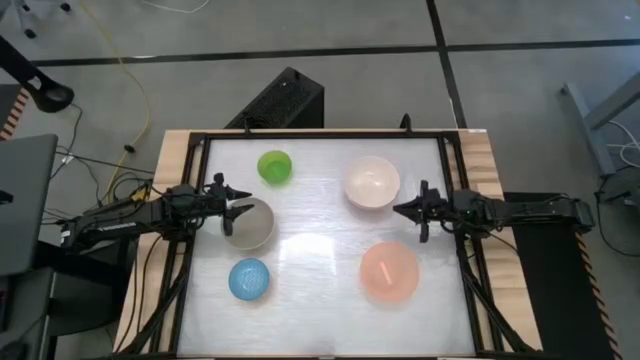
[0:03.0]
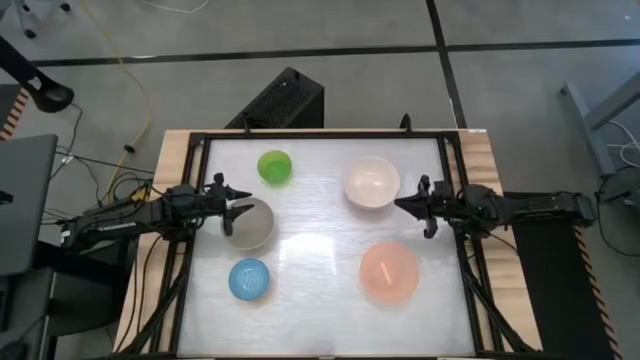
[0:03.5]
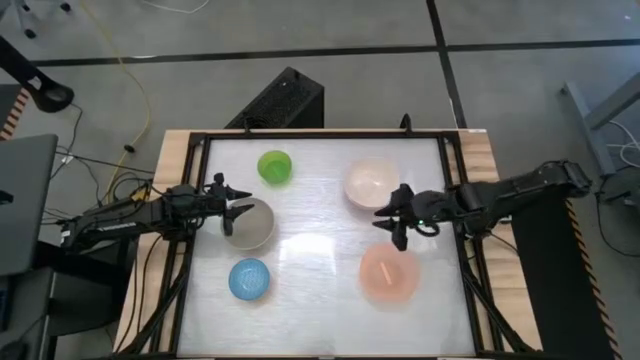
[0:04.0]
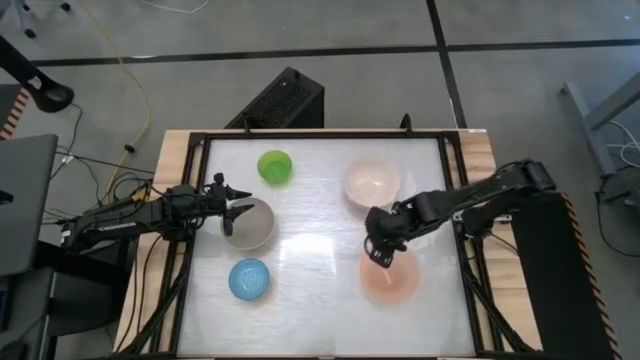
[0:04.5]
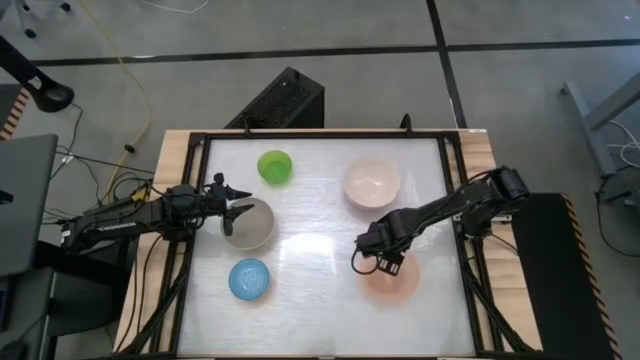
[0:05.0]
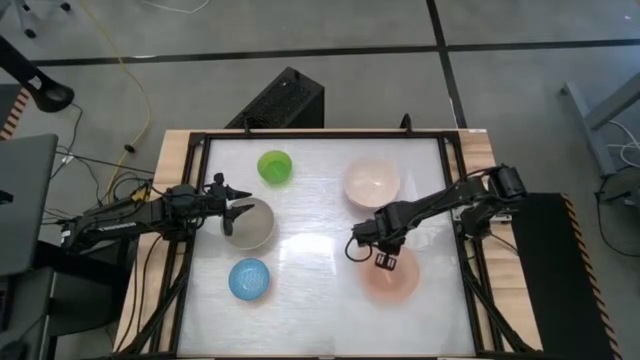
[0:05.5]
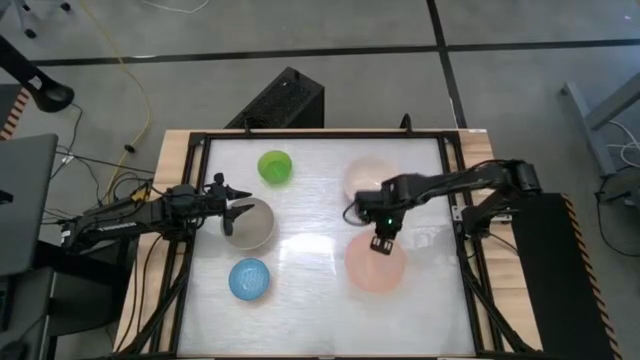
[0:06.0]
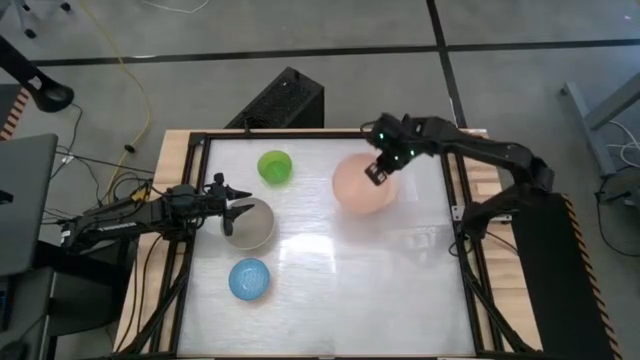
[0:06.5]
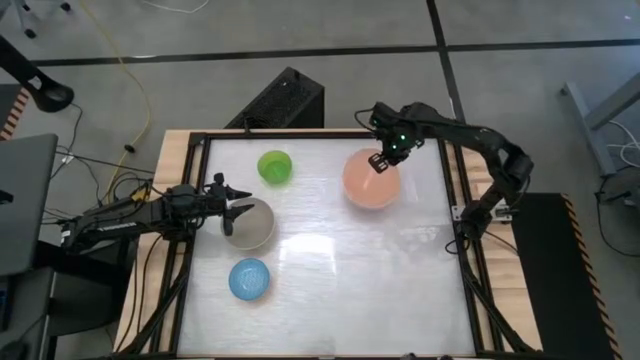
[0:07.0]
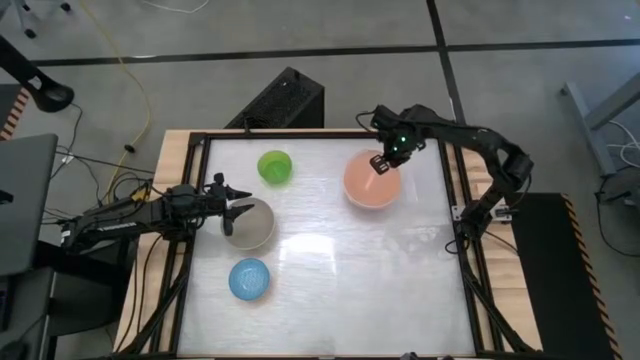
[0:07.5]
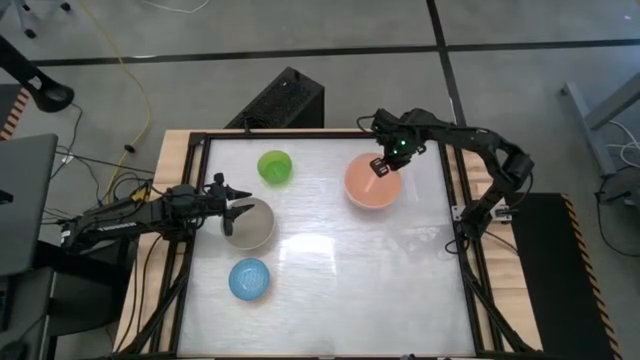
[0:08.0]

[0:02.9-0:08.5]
Stack the orange bowl on top of the white bowl

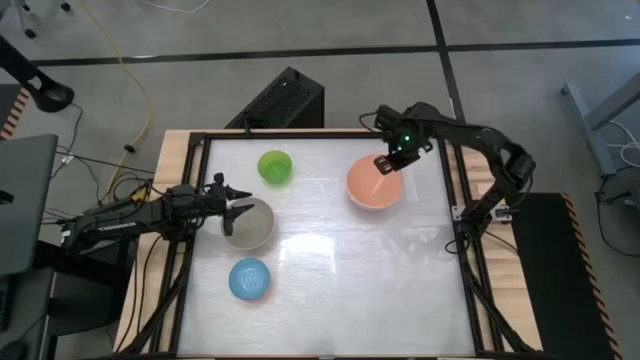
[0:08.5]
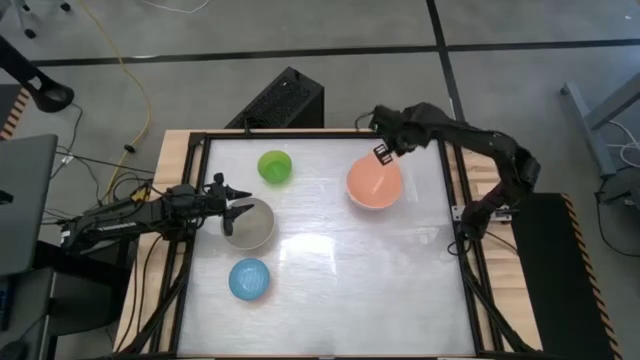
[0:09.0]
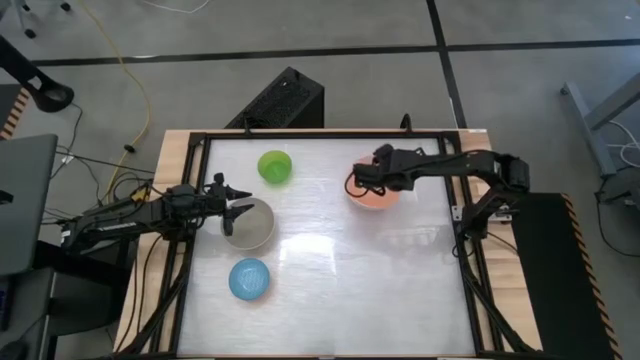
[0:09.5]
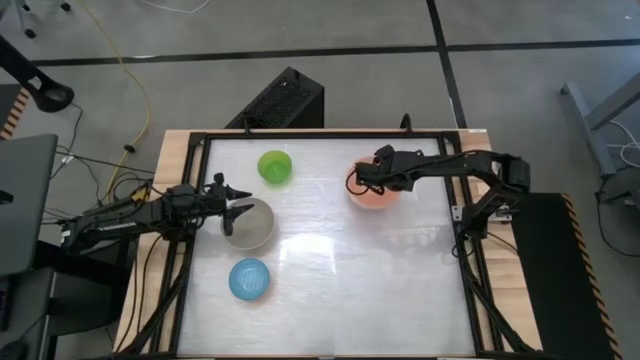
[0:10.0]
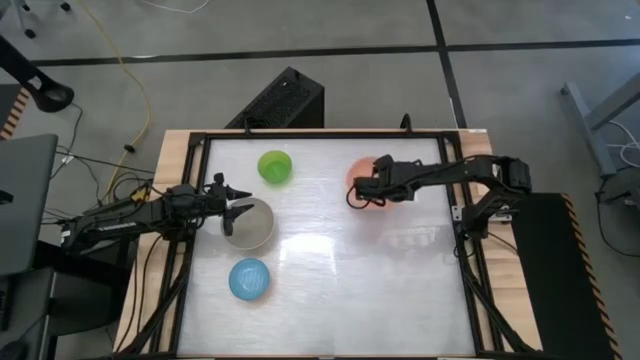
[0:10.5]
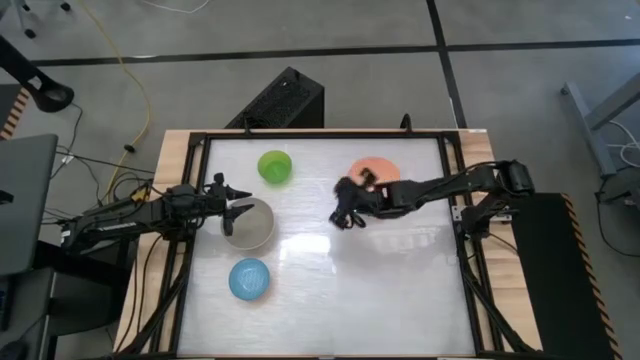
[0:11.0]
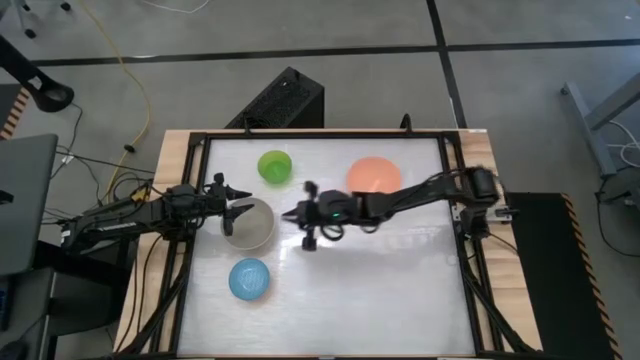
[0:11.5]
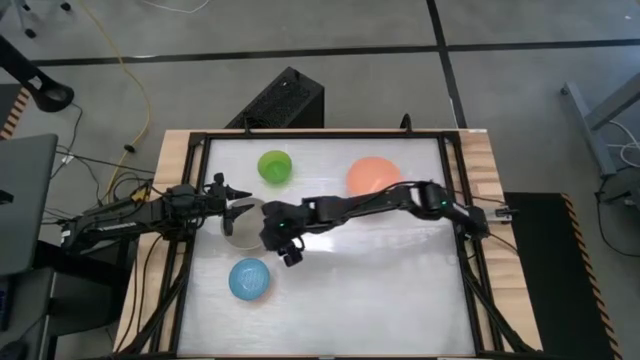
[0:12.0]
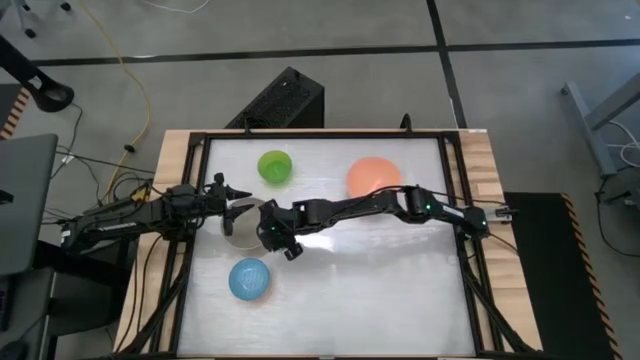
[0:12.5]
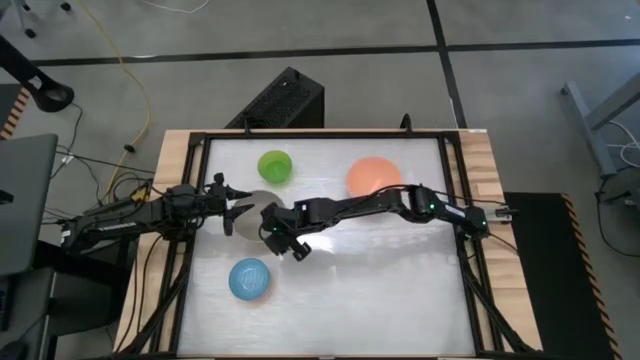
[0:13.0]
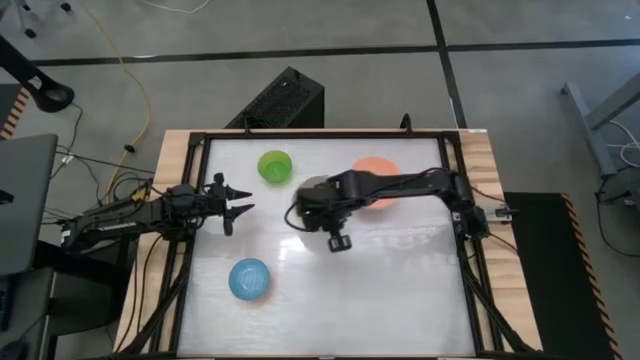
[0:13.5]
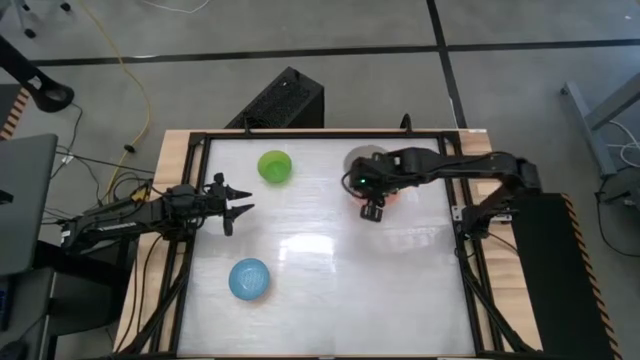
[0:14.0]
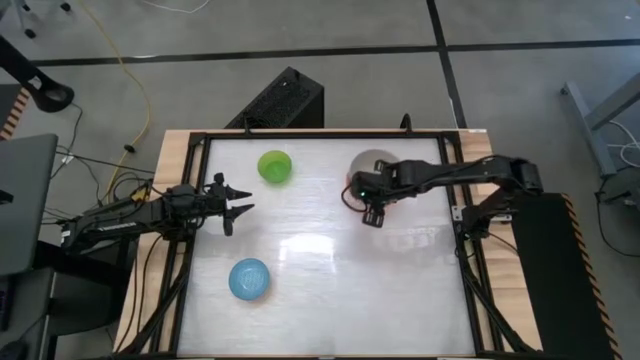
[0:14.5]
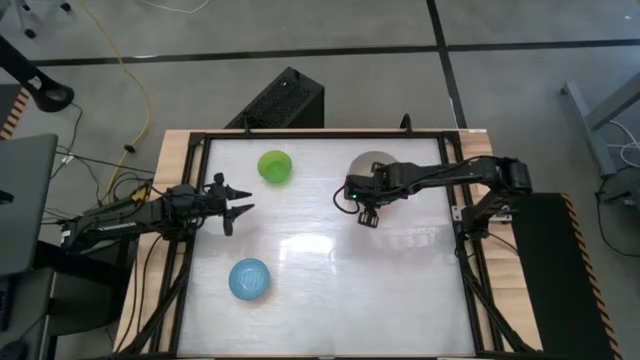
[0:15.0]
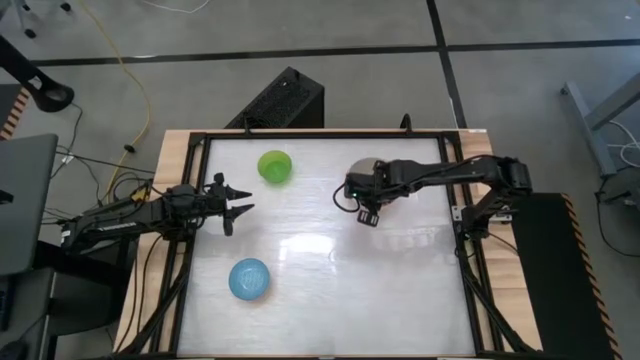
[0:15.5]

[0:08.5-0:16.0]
Stack the gray bowl on top of the orange bowl

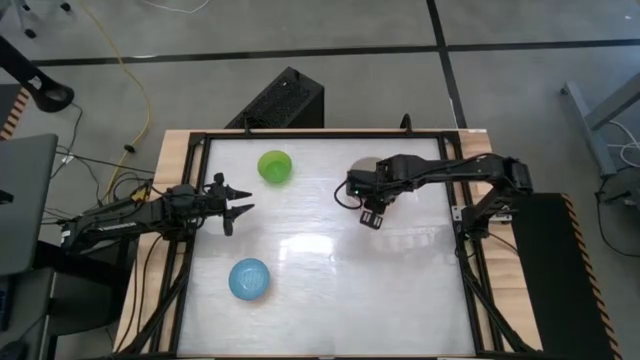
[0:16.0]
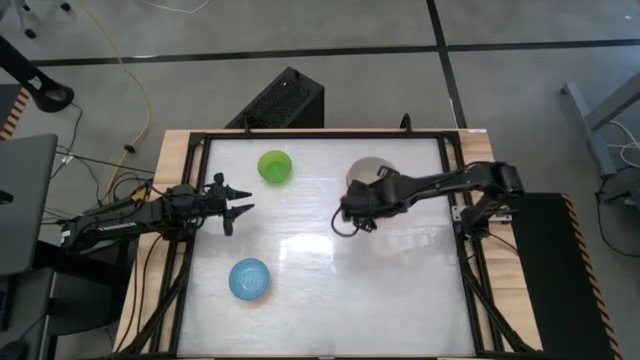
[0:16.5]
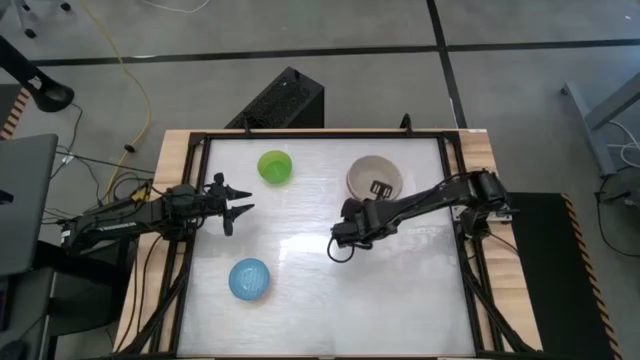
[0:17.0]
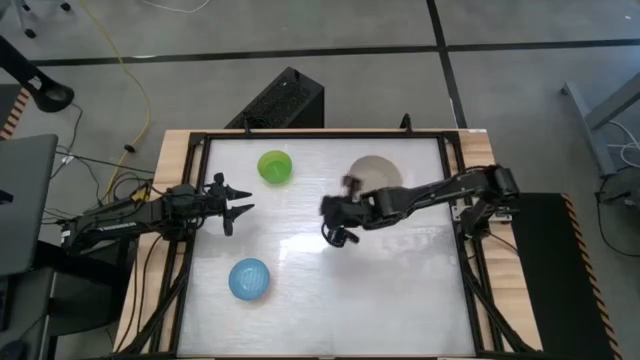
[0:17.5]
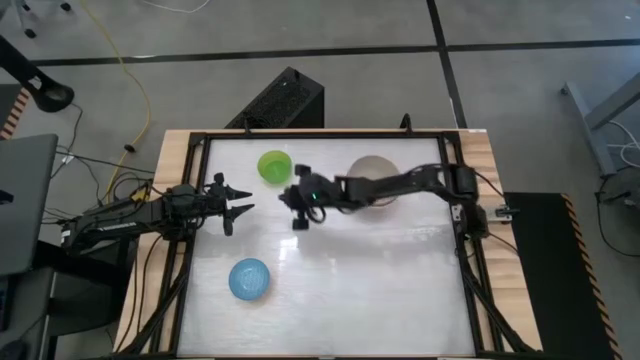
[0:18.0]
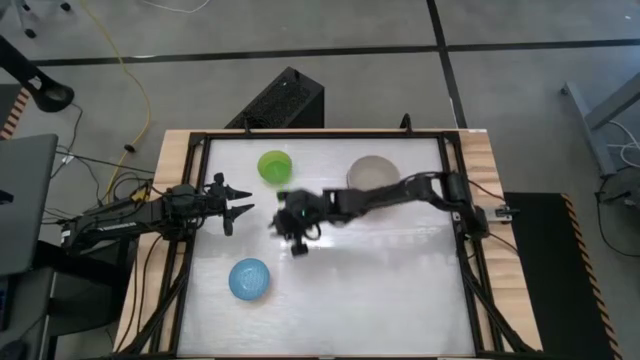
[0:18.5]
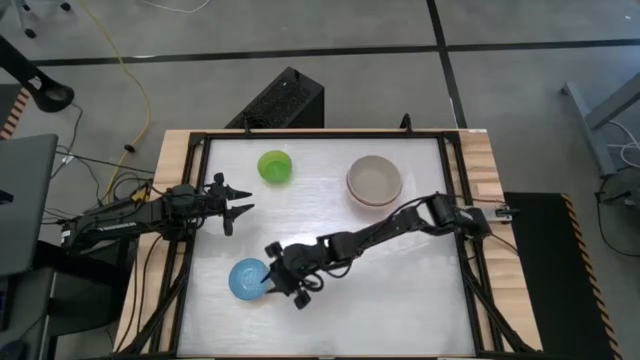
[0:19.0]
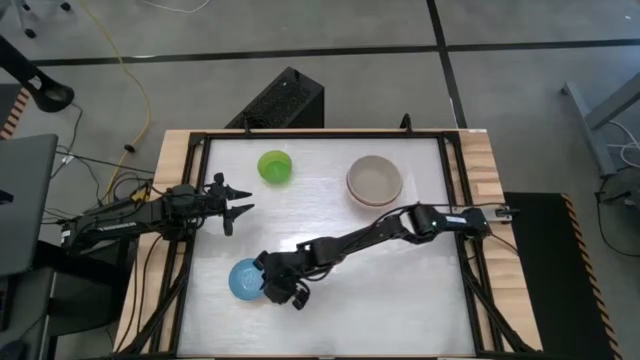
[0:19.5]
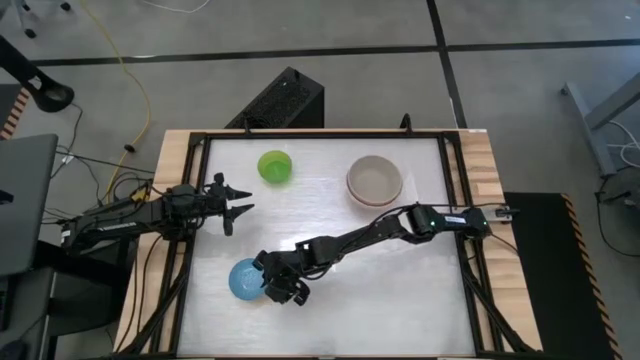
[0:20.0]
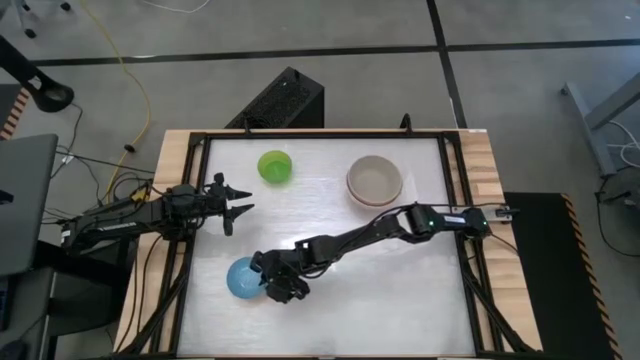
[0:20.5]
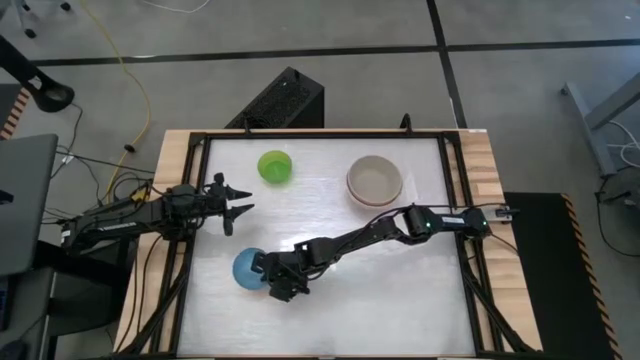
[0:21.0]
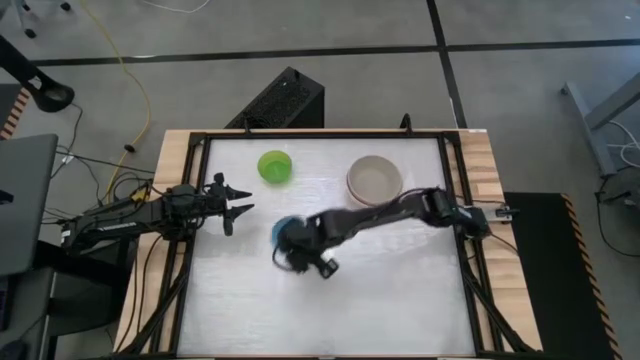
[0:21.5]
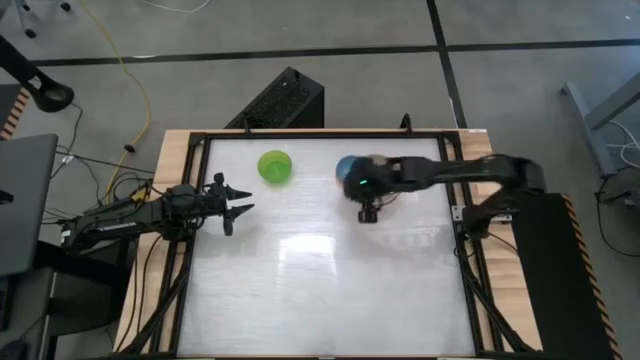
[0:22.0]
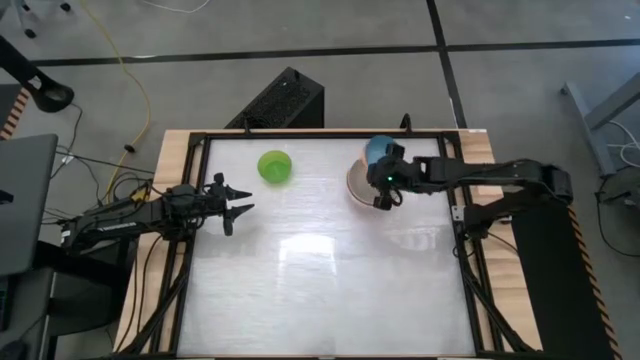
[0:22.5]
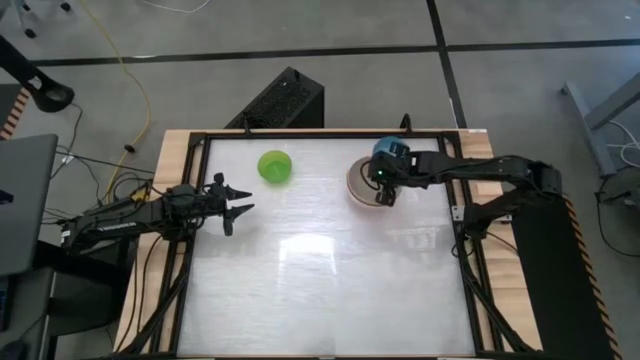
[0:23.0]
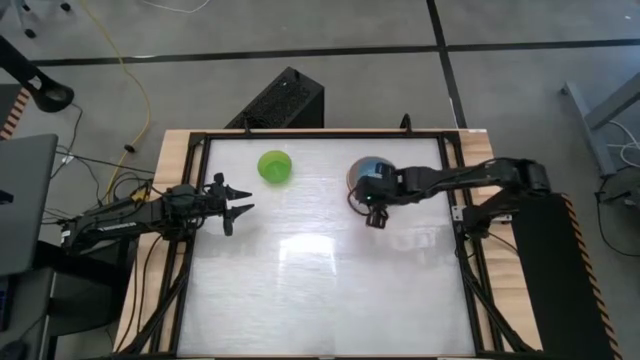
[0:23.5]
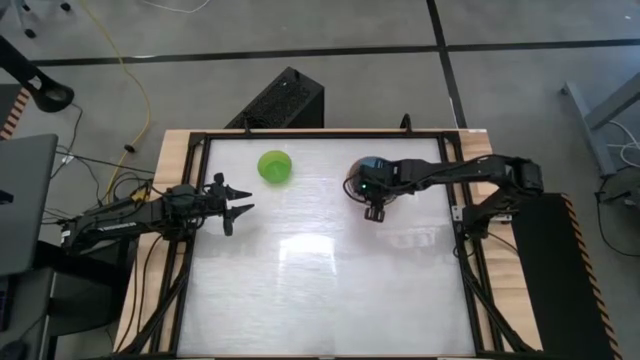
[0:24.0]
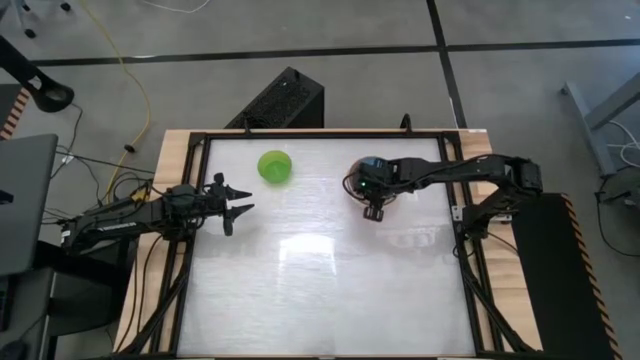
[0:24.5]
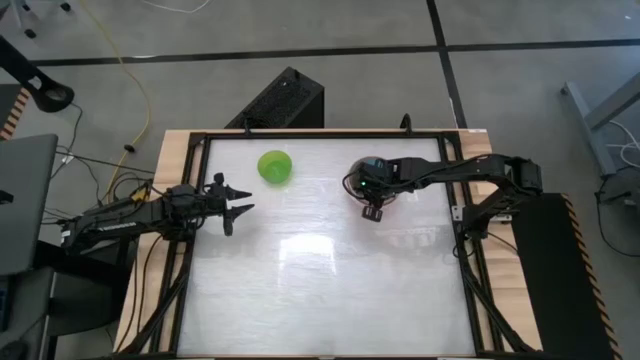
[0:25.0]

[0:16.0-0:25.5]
Stack the blue patterned bowl on top of the gray bowl
